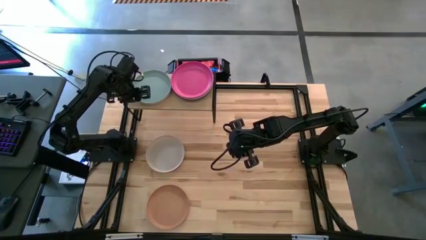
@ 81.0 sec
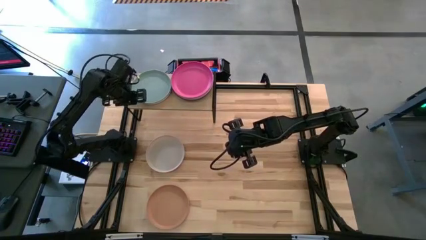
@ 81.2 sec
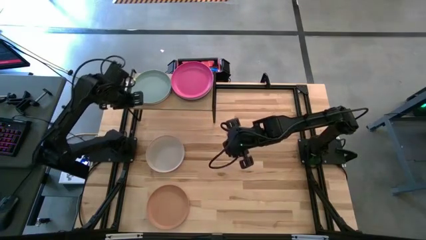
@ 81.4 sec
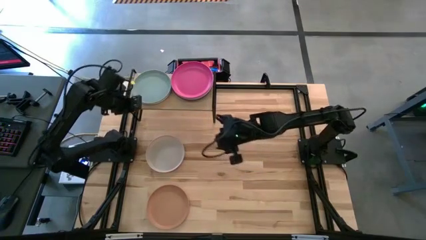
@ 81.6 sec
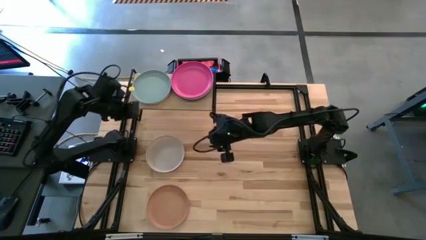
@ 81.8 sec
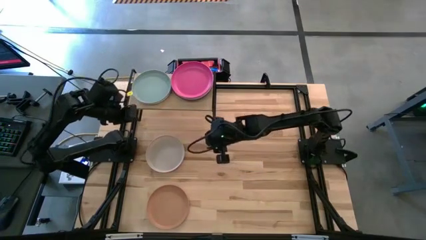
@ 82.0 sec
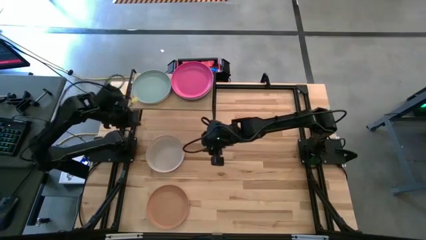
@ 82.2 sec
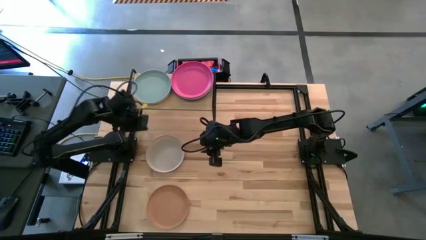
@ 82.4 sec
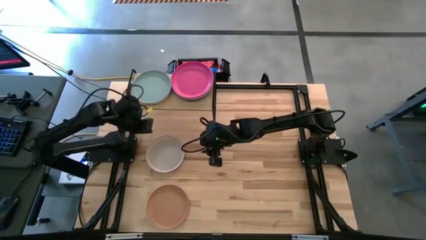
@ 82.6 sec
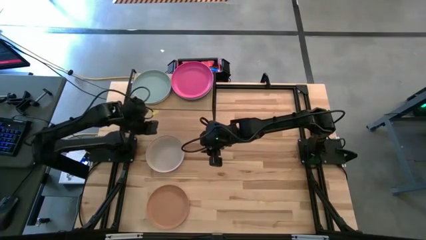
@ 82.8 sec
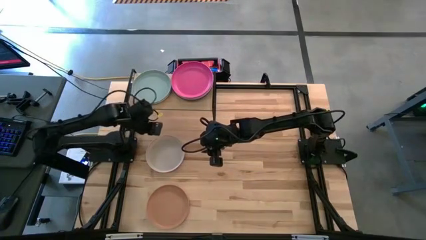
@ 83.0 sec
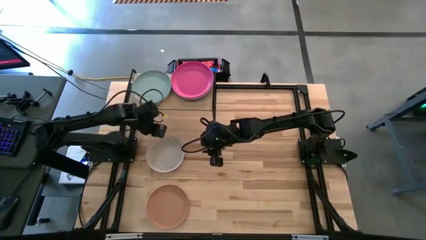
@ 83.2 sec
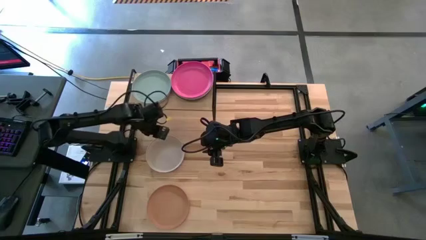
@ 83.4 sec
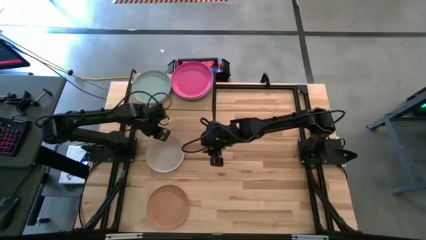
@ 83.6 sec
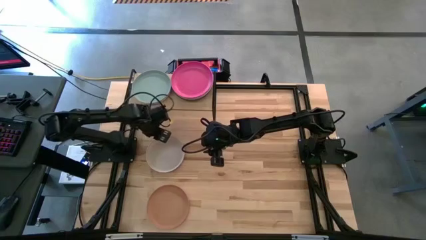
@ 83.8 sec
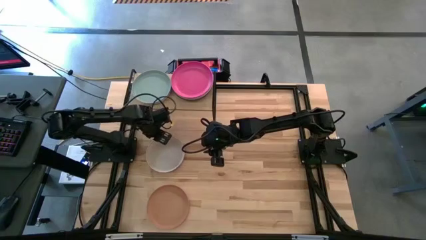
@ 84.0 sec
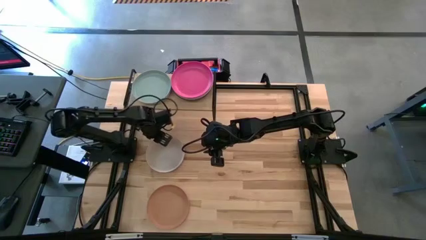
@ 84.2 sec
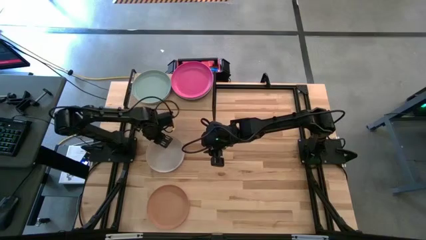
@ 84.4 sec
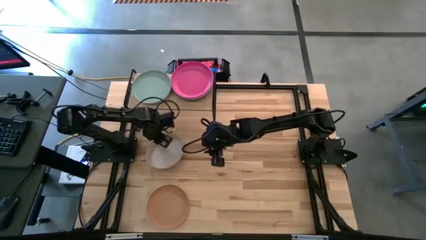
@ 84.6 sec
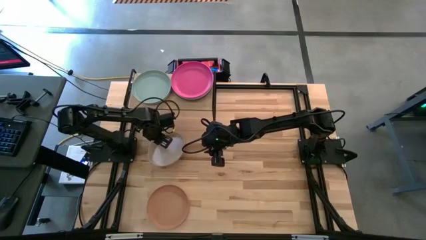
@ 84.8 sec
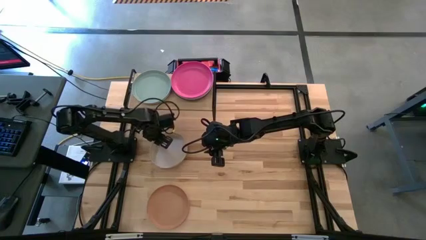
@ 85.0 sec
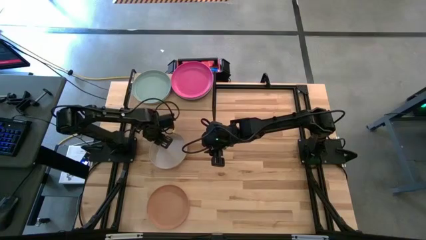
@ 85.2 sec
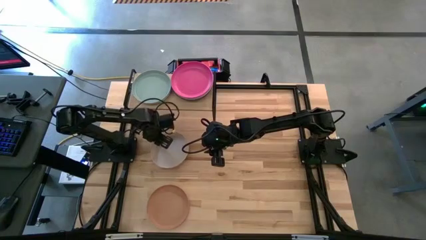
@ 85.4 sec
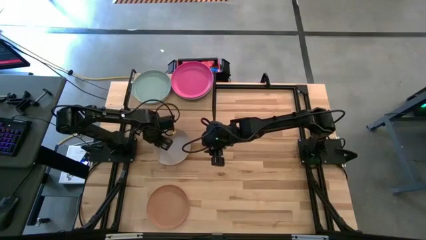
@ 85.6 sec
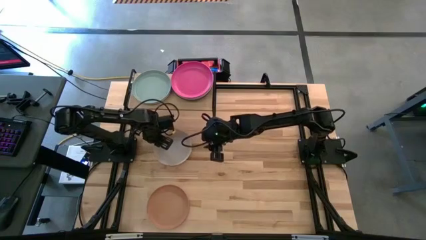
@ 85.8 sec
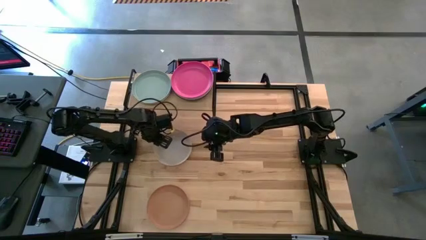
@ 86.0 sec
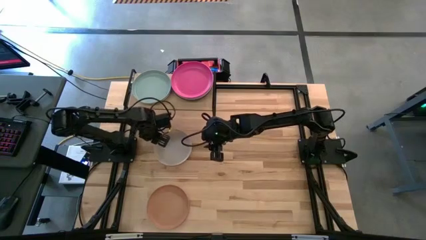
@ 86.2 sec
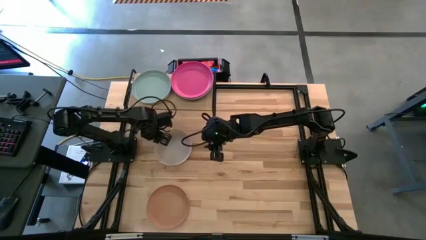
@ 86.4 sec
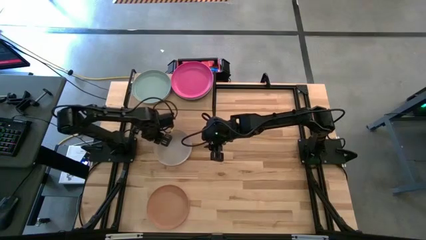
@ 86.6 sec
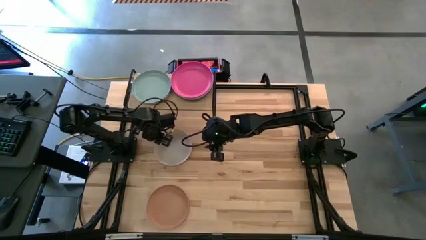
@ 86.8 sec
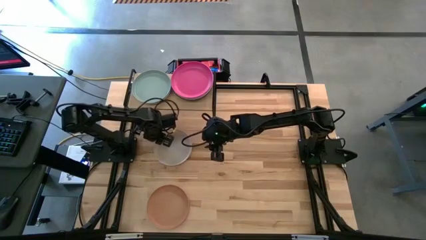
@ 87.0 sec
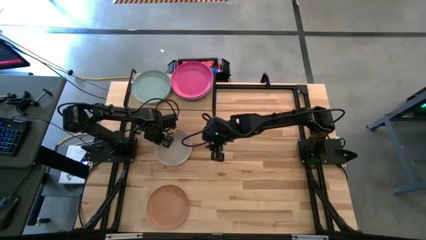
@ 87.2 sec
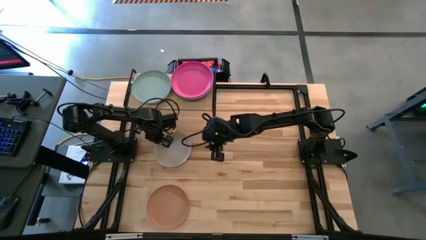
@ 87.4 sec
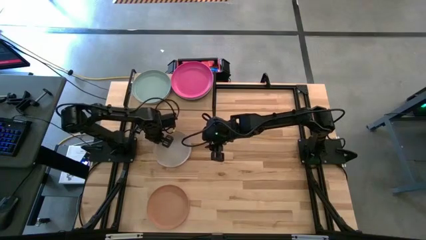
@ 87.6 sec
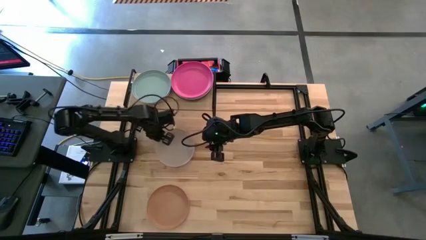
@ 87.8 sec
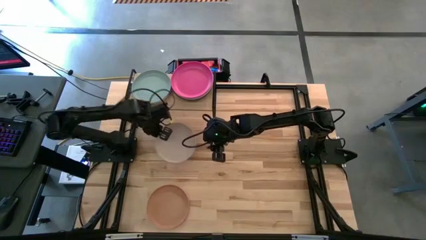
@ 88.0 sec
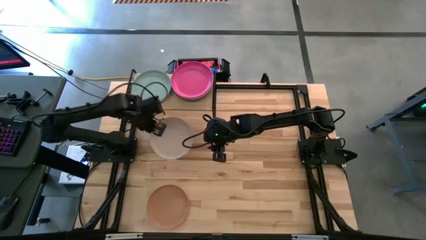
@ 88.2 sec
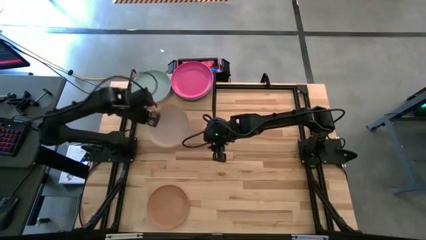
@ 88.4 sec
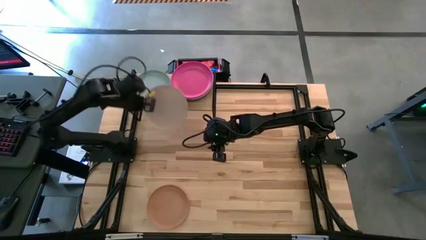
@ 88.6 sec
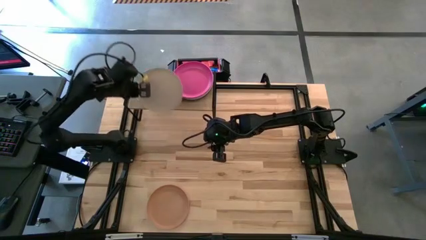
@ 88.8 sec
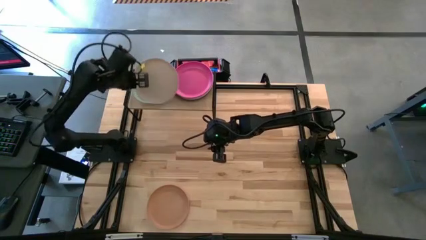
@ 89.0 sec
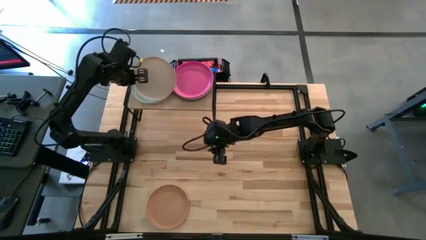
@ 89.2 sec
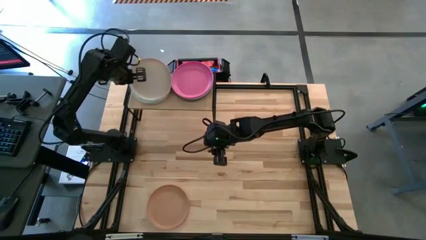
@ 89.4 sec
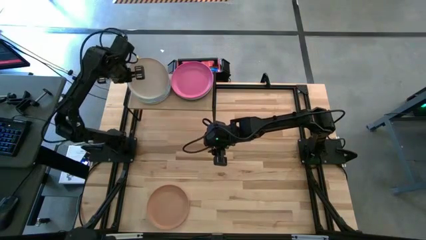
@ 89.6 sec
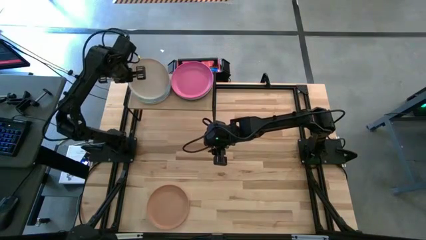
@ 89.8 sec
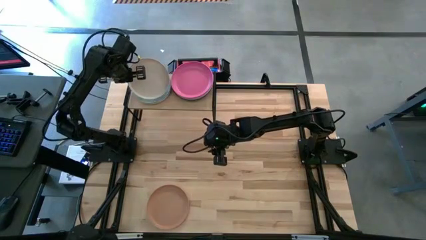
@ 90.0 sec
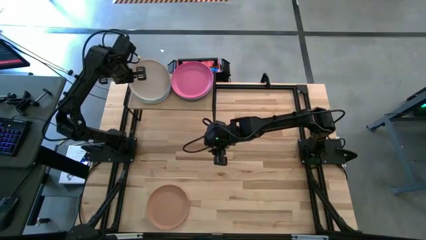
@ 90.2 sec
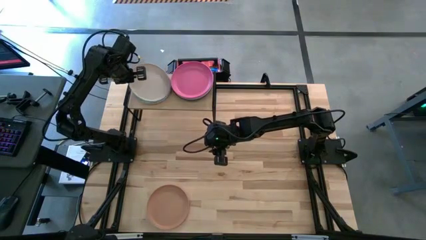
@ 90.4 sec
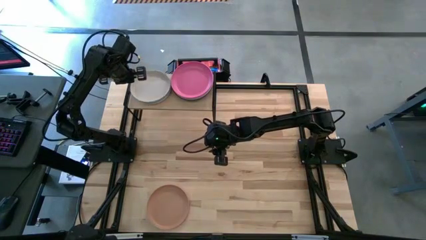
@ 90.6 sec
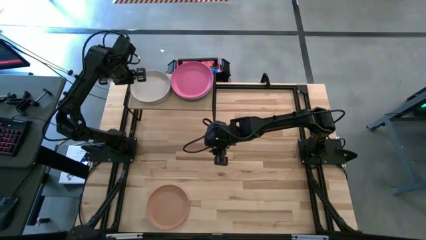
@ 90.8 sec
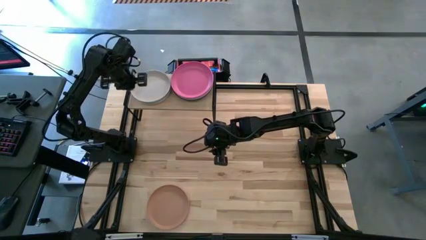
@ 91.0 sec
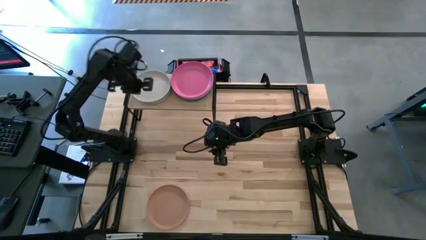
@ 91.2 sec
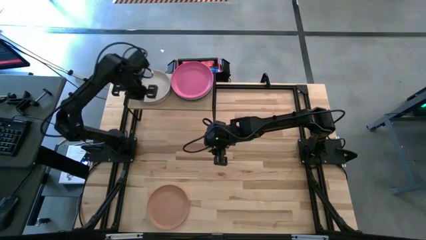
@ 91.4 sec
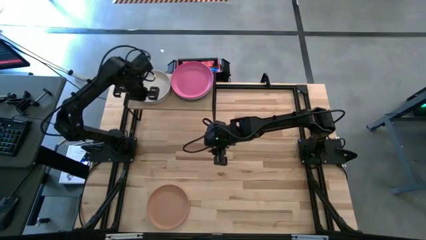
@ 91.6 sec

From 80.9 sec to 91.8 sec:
Task: Place and stack plates onto a shelf
Stack the white plate on the light blue plate on the shelf

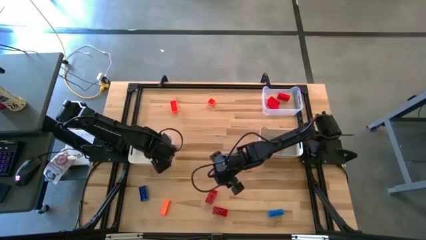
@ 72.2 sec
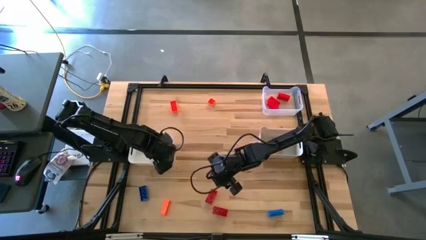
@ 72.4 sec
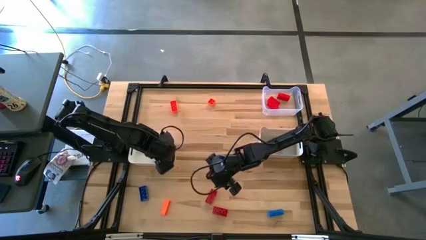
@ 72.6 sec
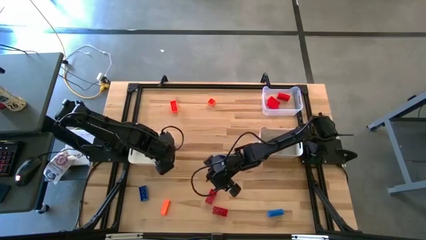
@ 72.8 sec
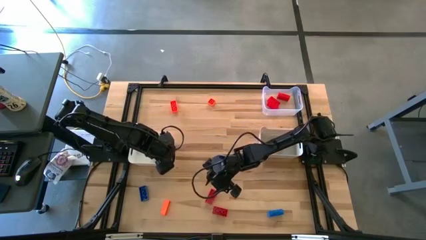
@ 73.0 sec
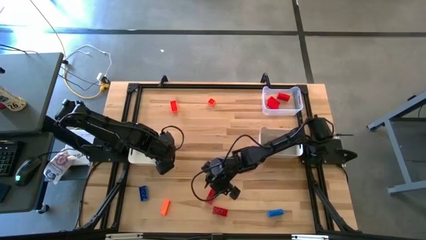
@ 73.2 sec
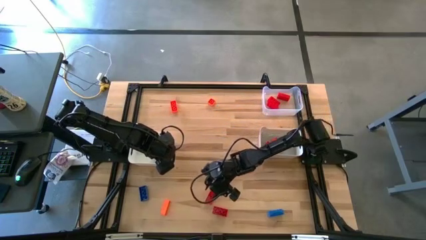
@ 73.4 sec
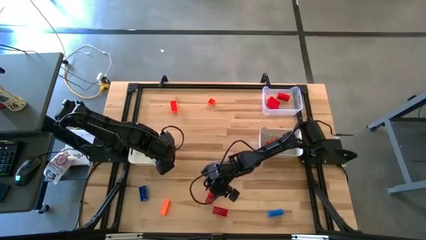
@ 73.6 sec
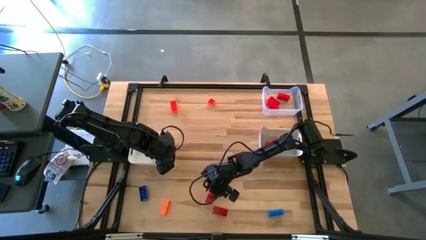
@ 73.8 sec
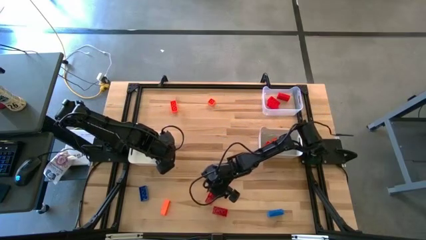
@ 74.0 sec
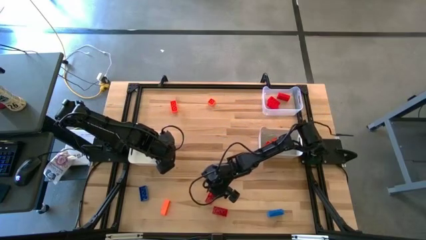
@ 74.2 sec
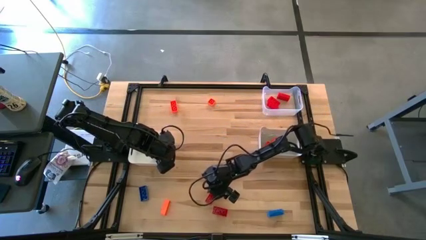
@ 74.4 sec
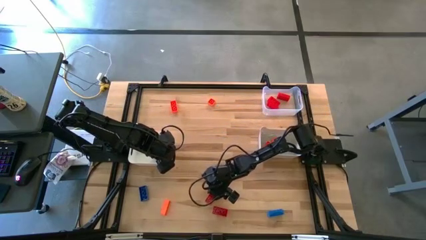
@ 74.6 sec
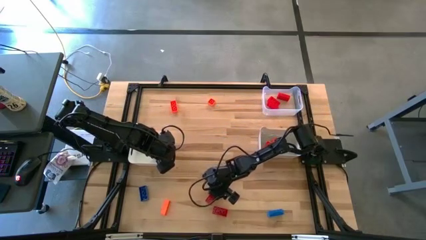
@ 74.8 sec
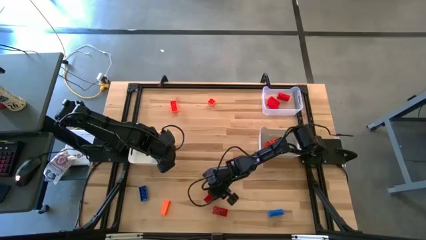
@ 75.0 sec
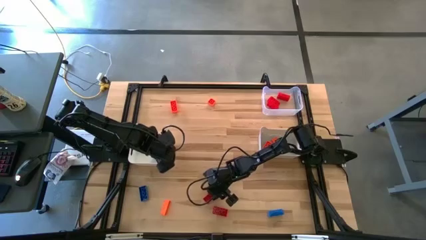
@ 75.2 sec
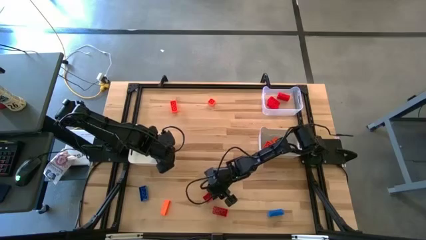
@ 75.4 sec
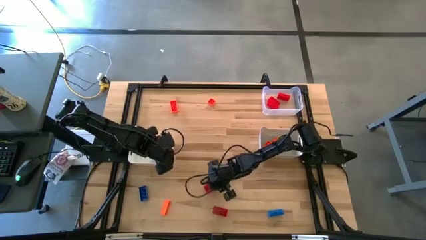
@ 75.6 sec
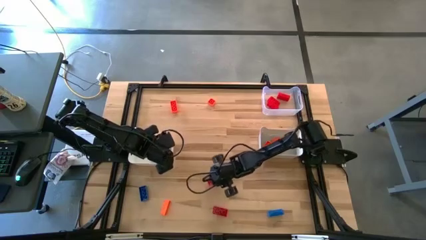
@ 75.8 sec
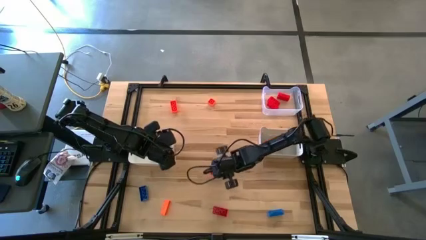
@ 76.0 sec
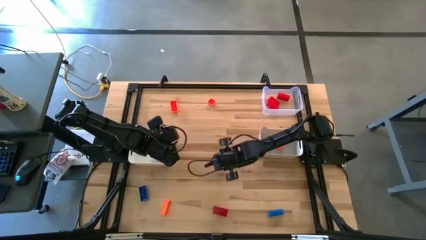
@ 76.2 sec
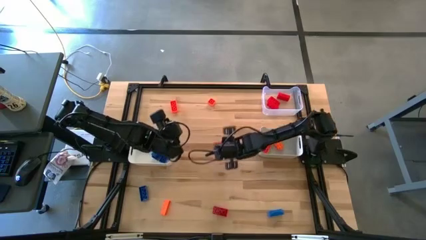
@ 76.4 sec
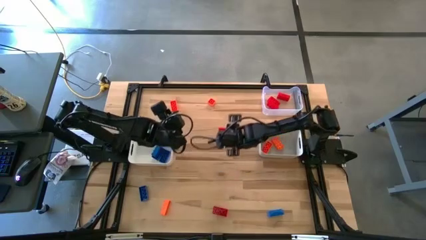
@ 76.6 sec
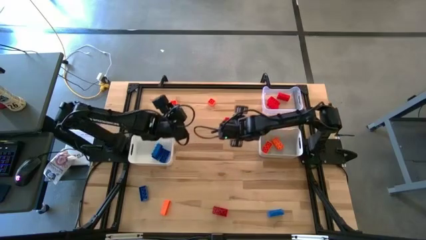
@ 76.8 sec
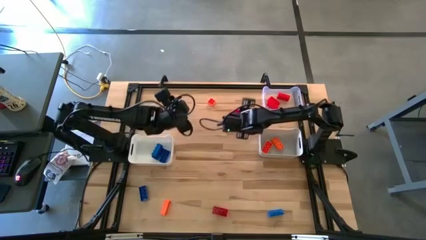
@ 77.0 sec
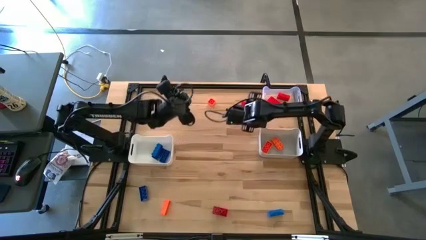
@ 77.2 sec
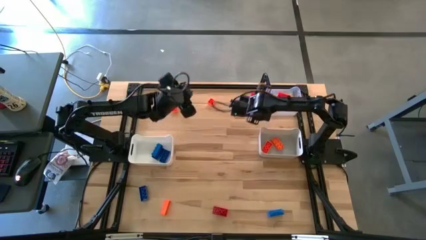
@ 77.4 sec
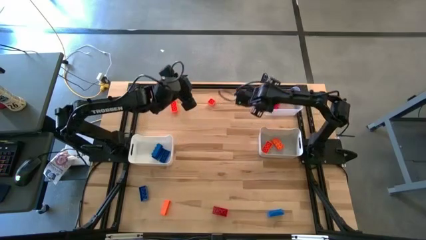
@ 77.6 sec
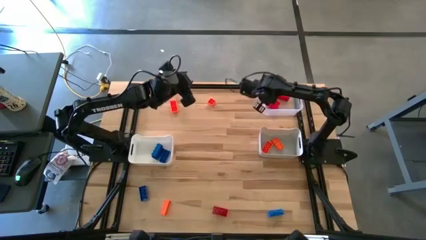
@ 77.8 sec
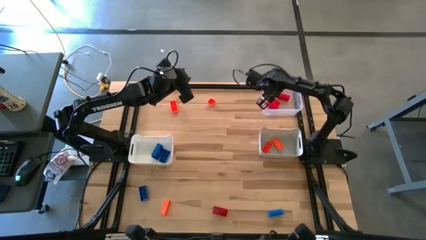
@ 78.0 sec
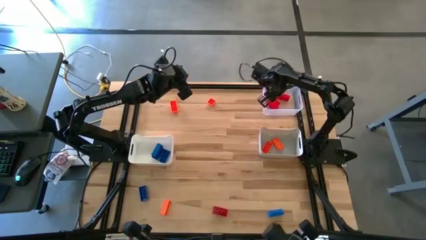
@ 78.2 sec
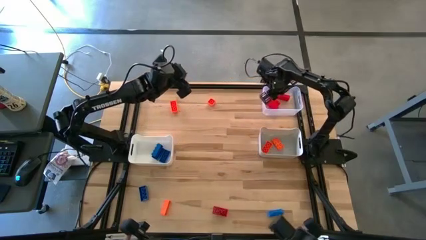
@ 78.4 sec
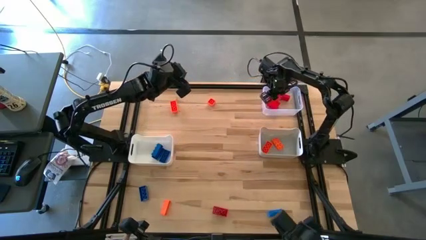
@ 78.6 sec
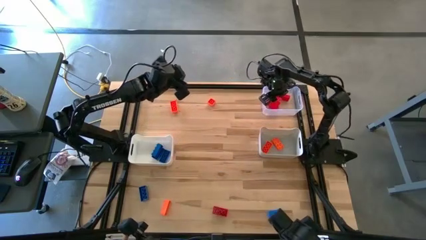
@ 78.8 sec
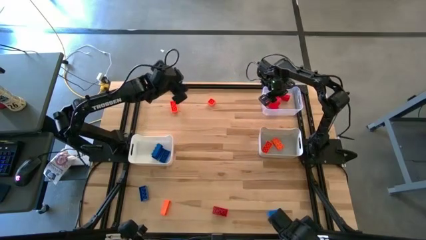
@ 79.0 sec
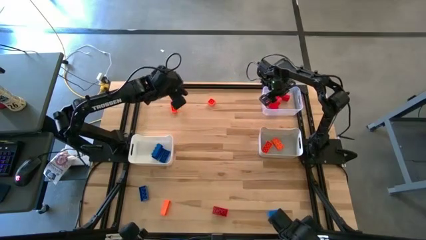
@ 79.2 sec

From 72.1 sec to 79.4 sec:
Task: Sort & place blocks by color
Put the red game piece into the transparent bin
